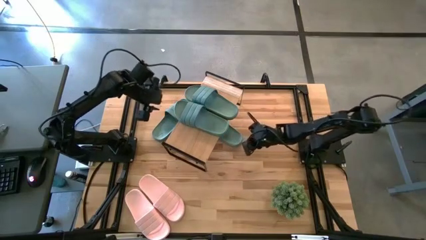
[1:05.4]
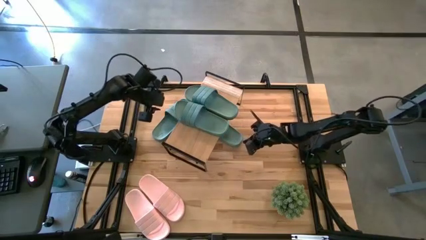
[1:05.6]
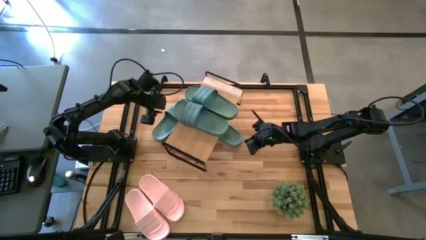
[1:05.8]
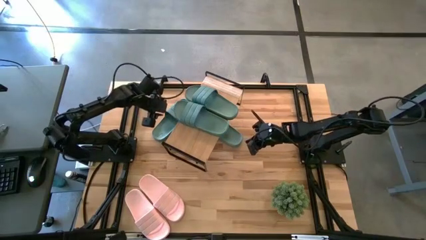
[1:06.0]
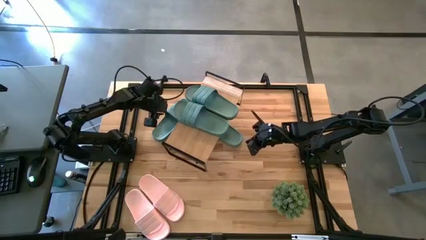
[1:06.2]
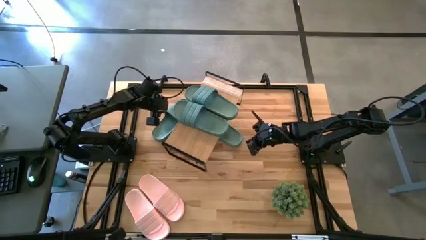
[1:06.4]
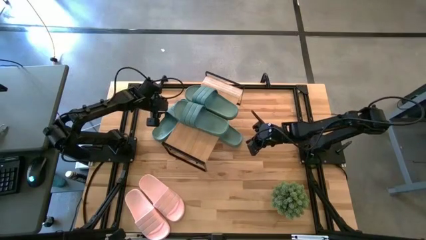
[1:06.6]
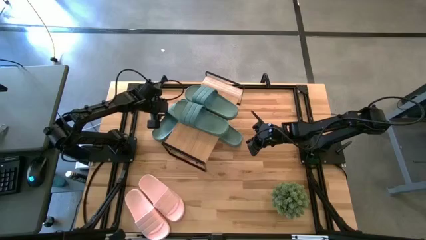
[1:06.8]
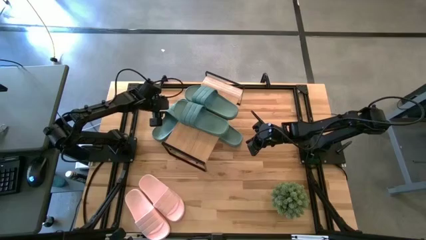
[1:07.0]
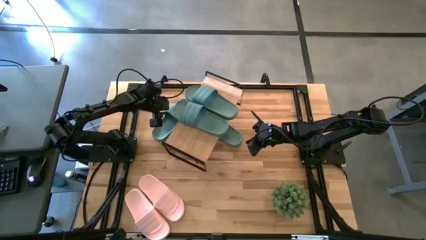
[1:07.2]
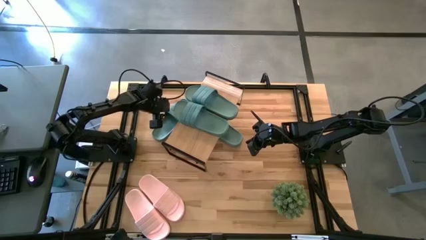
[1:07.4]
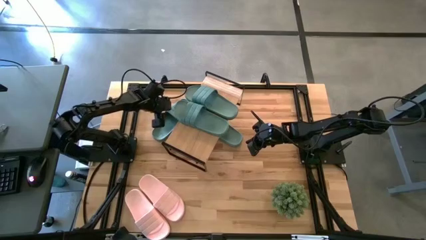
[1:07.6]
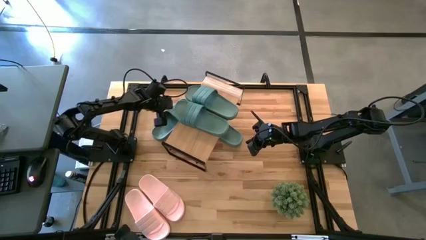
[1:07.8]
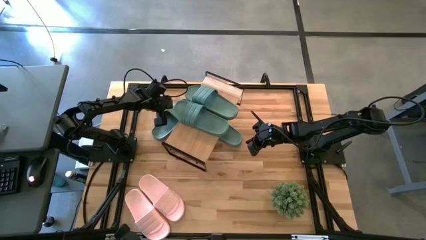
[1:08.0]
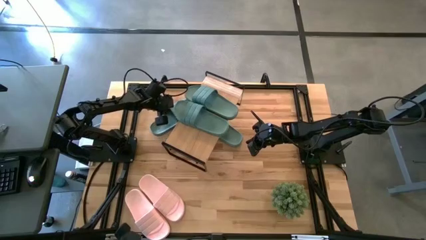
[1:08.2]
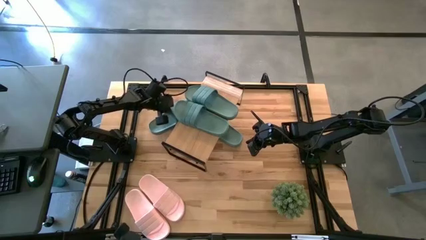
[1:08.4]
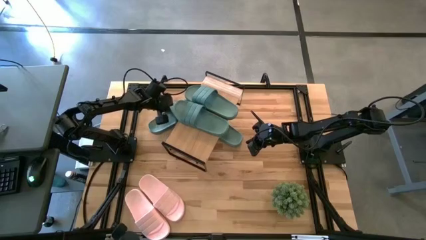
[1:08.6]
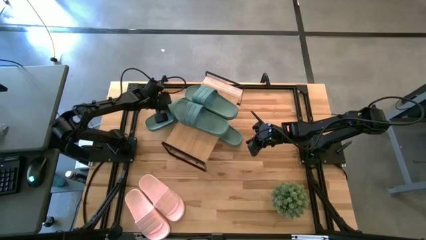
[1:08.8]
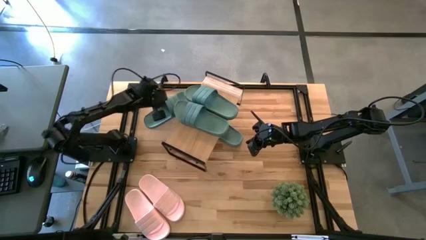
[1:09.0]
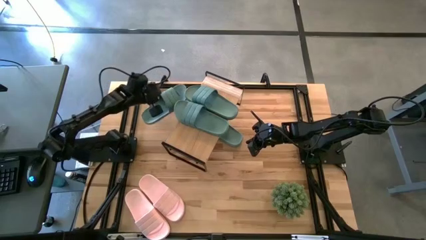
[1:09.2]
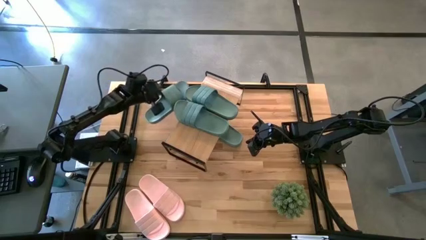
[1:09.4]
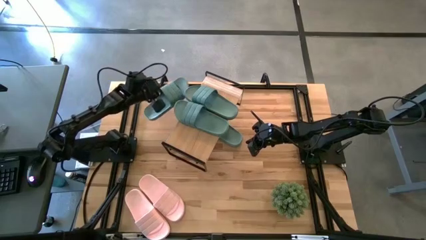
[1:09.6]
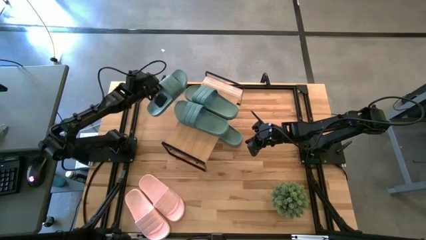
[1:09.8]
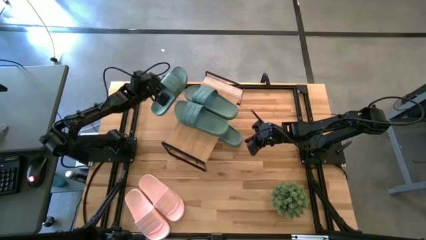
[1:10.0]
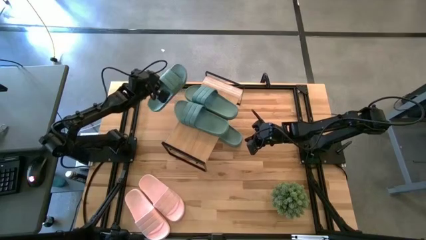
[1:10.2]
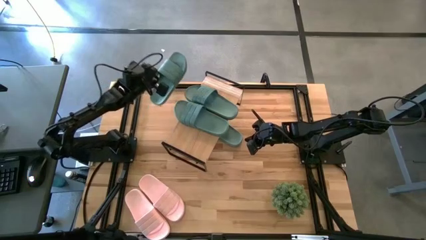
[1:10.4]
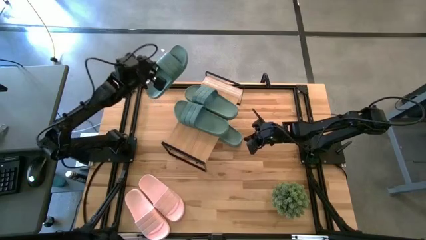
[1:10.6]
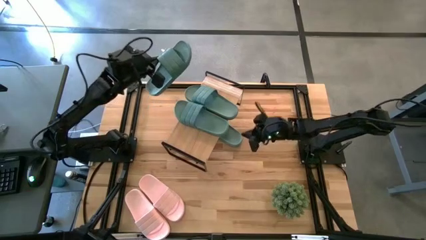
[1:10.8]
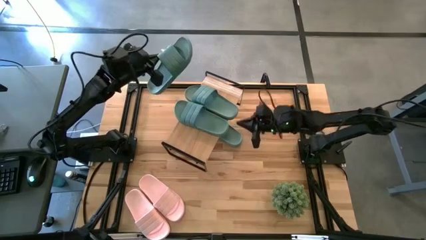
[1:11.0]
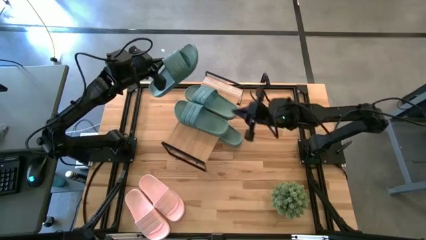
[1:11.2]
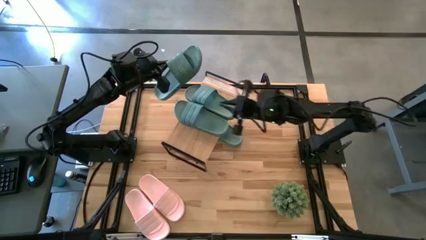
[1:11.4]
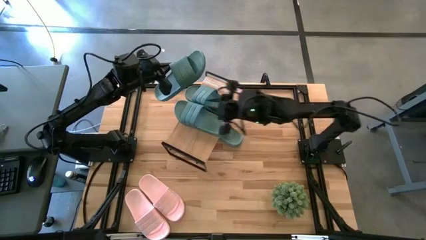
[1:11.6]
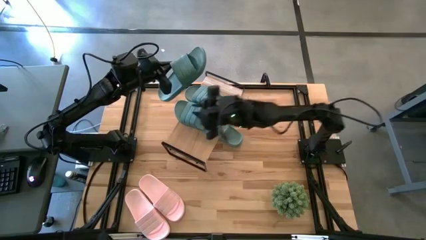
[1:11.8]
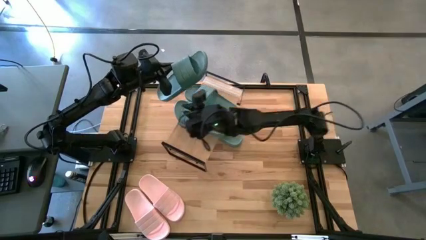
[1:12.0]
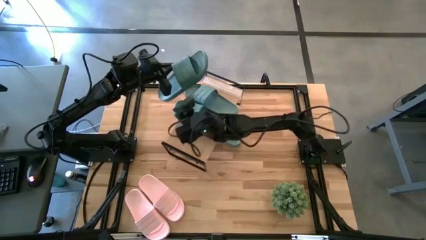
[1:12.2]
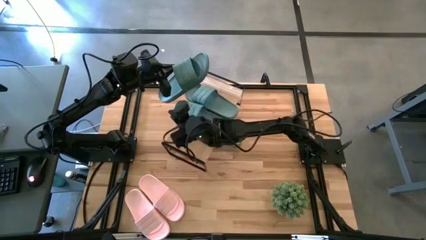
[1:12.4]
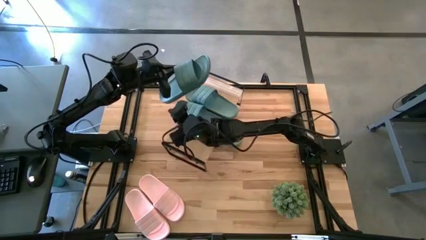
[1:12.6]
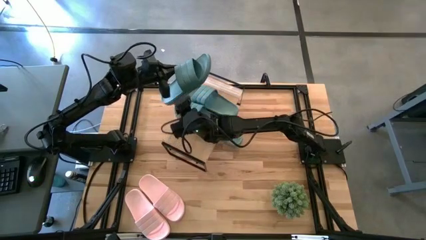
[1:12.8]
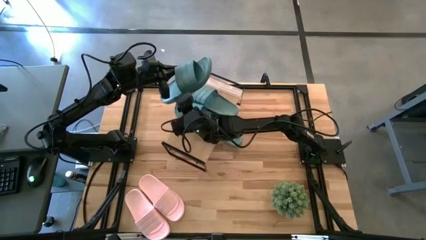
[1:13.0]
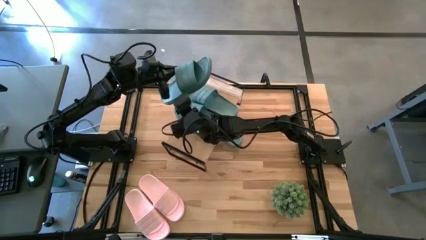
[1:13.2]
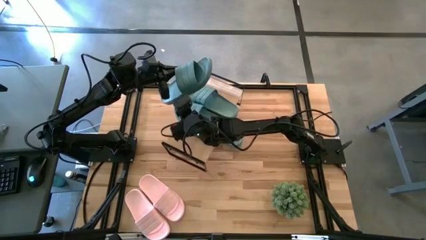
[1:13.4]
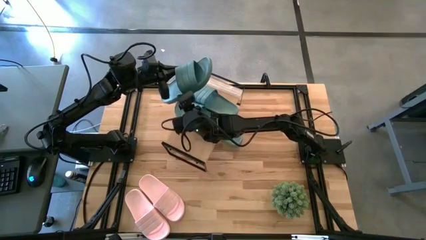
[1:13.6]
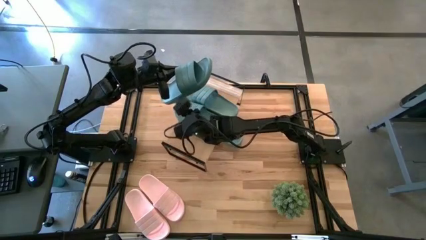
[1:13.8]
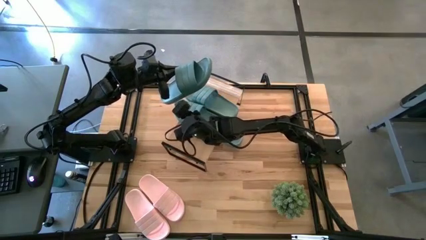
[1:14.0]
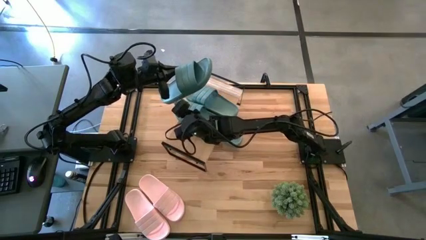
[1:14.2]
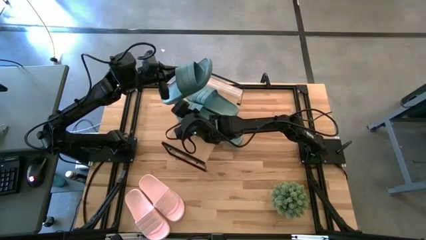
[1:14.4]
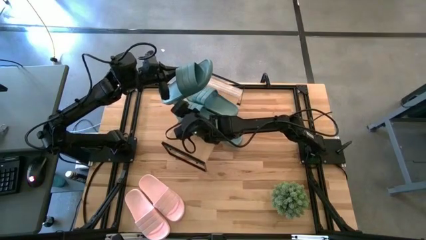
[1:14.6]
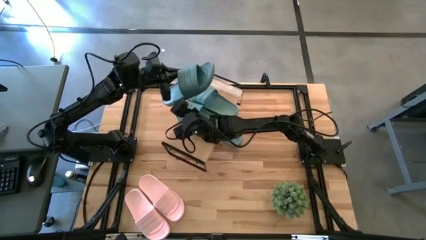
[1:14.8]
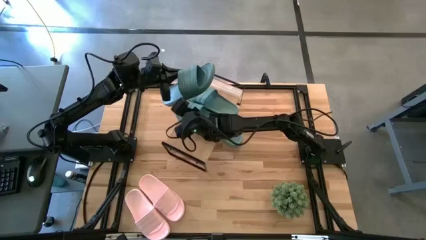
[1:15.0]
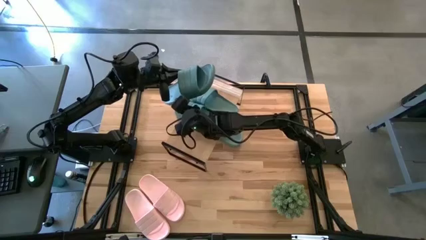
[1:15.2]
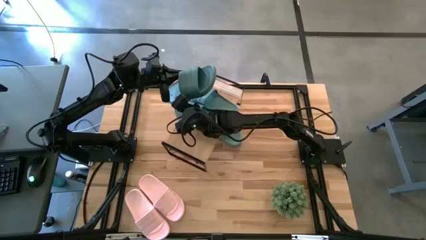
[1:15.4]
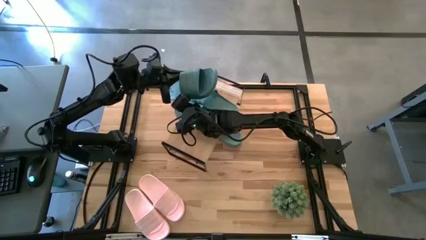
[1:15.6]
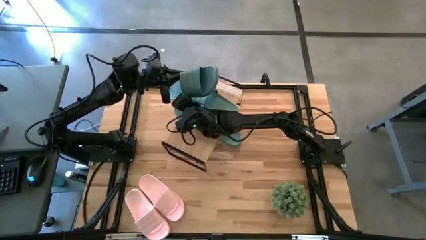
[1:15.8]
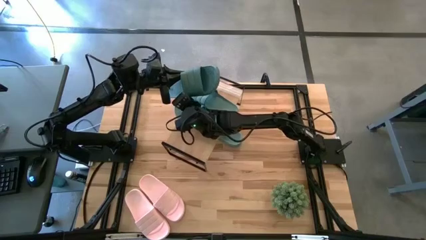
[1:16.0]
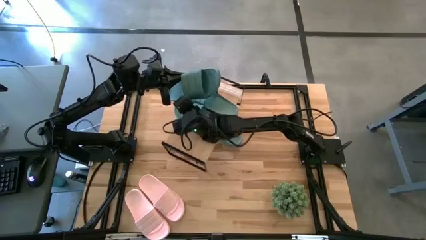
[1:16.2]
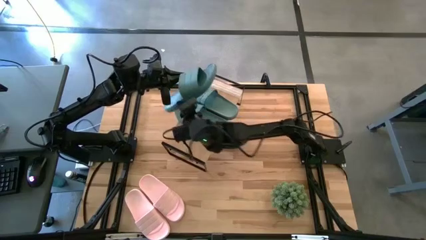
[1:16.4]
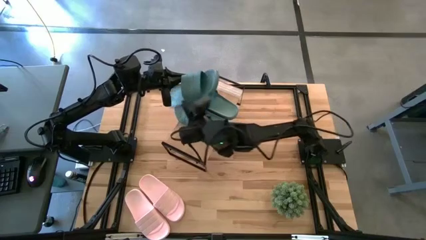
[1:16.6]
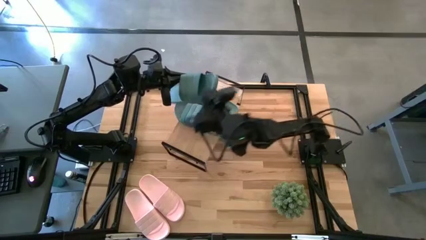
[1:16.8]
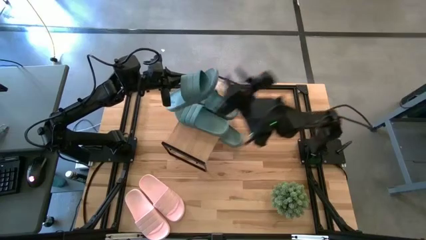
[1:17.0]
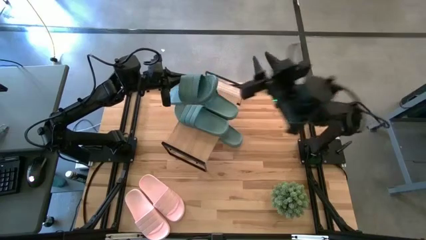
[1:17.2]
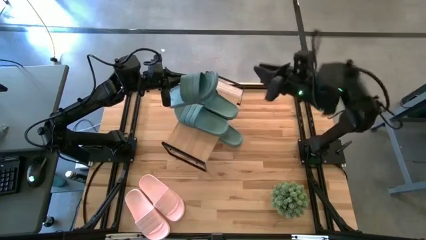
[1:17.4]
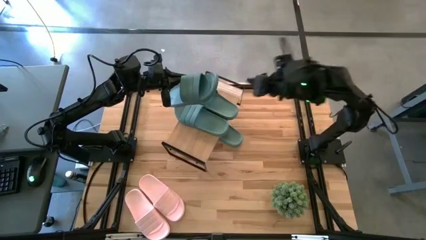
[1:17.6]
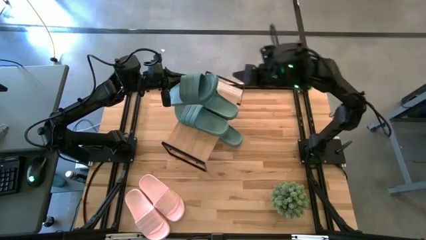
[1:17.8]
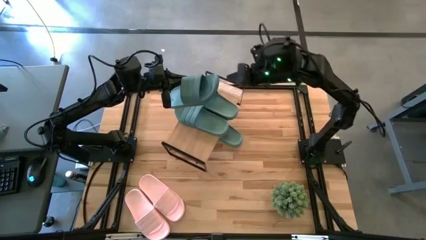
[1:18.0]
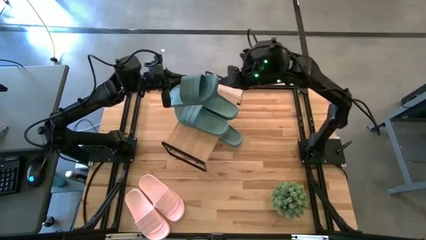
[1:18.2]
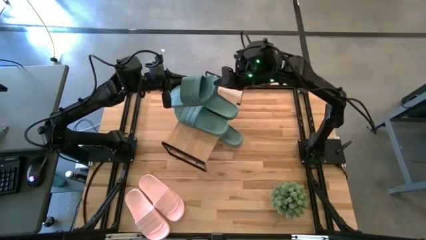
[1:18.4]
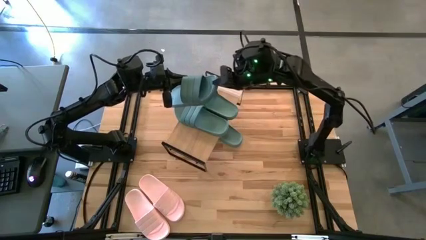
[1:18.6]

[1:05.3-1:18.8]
Task: Pick and place slides into the shelf
Put the green slide under the shelf
